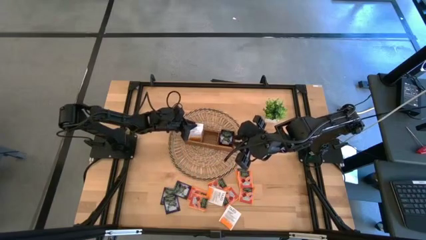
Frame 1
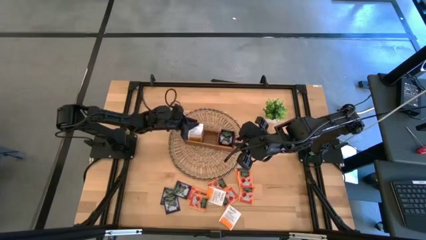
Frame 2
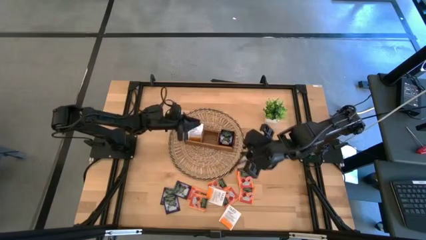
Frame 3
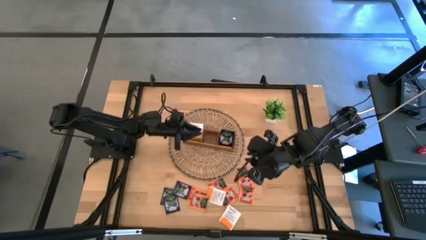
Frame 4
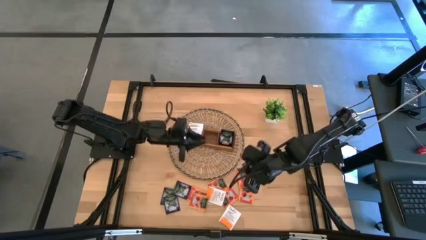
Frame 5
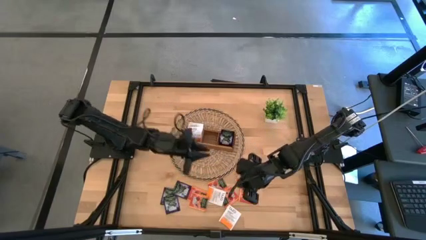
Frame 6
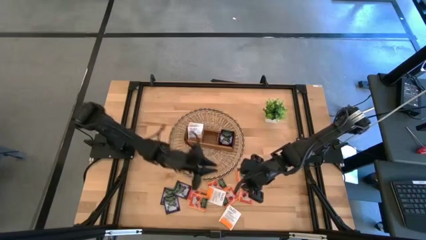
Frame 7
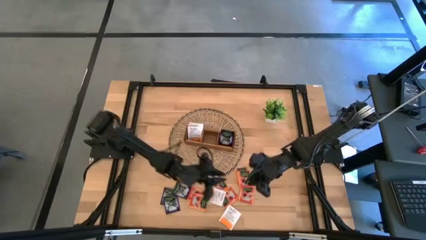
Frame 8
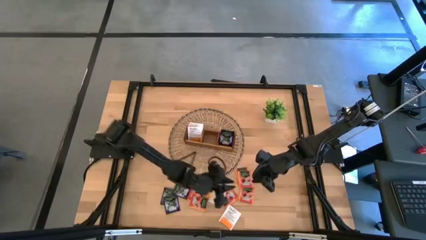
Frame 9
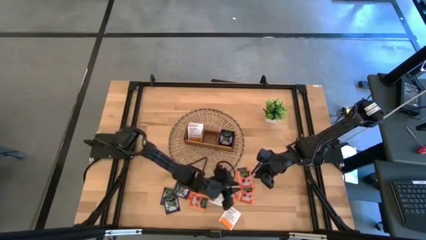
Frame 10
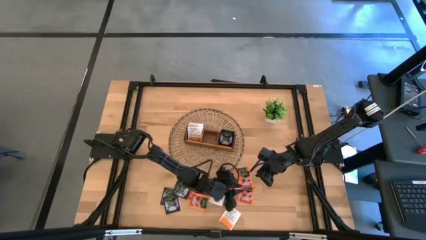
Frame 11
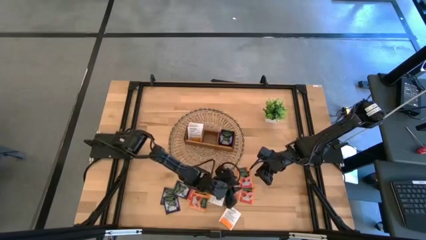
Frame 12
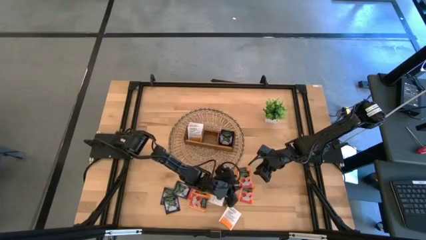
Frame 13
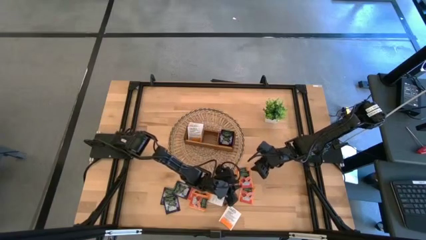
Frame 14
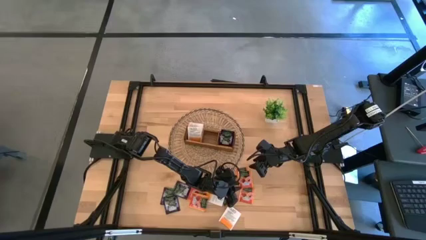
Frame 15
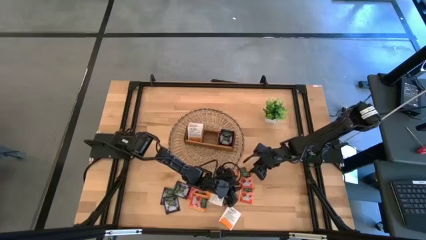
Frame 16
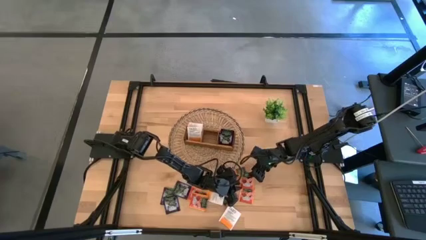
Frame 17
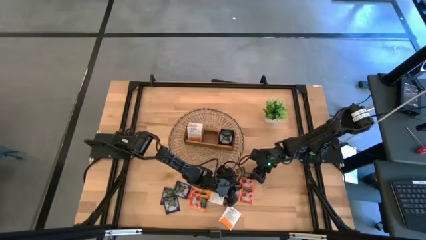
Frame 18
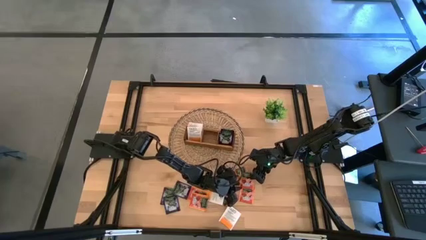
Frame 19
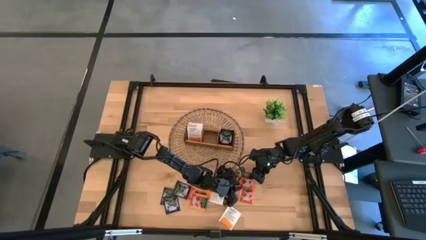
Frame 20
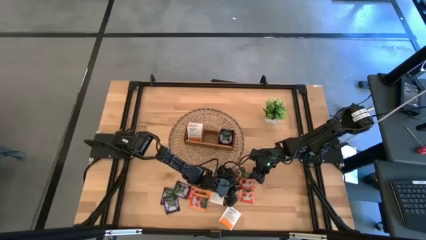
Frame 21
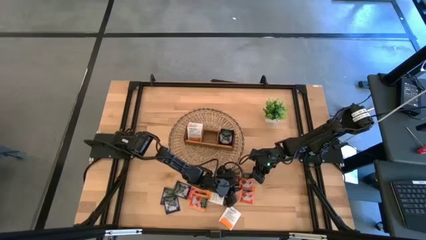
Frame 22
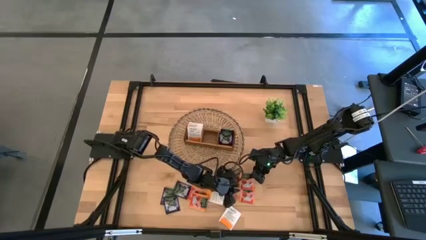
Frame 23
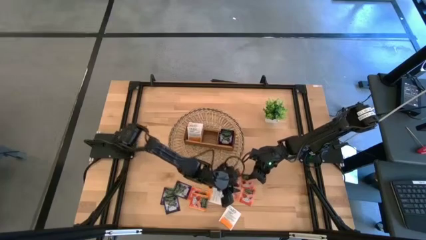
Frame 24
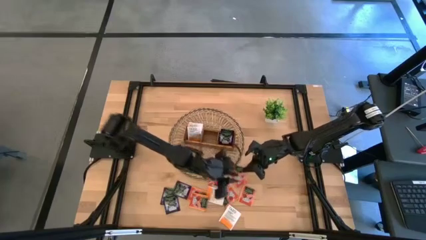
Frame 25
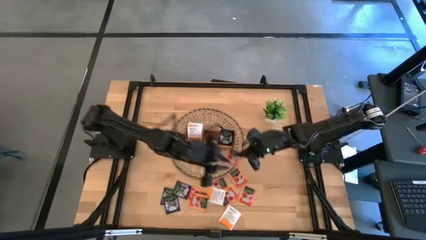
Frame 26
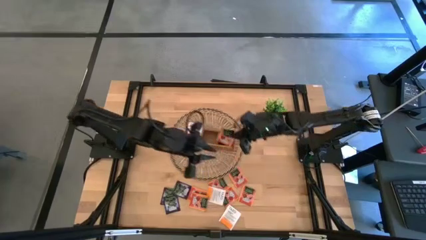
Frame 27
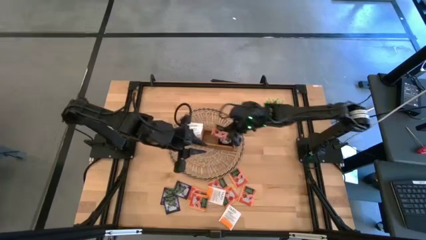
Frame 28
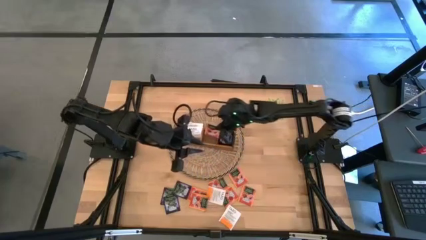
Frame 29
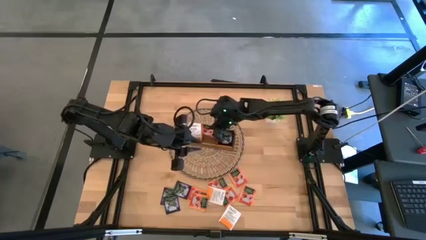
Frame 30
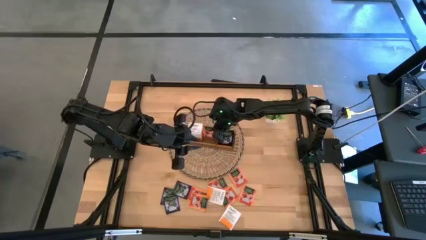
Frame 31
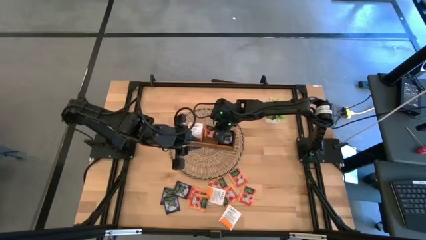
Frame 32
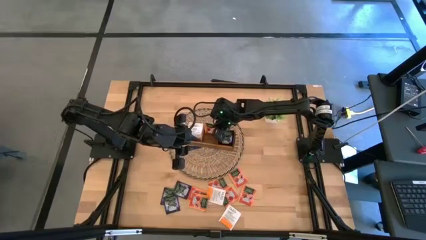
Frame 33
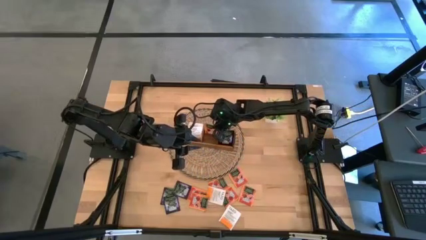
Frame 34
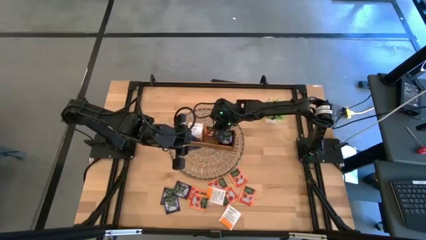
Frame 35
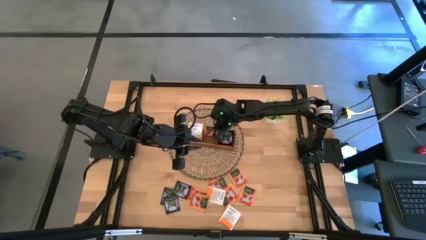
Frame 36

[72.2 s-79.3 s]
Task: Pick & Place Tea
Put the orange tea bag into the middle section of the wooden organizer

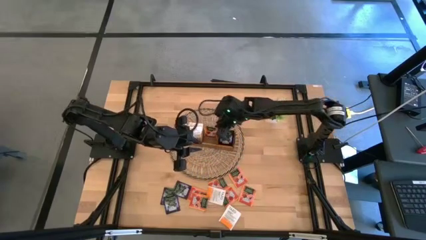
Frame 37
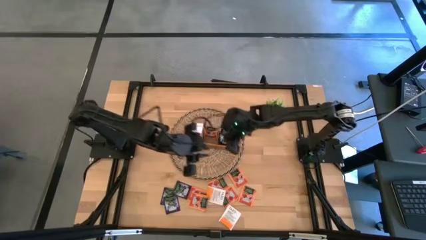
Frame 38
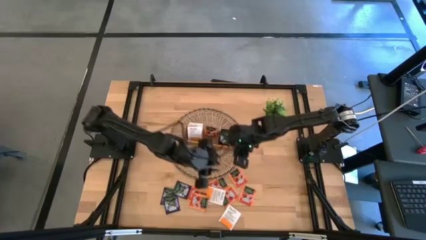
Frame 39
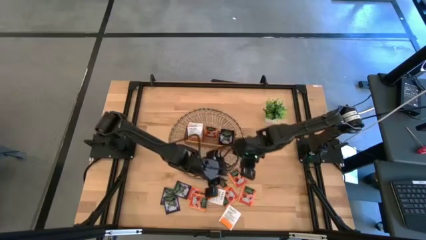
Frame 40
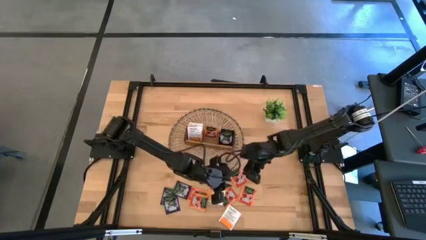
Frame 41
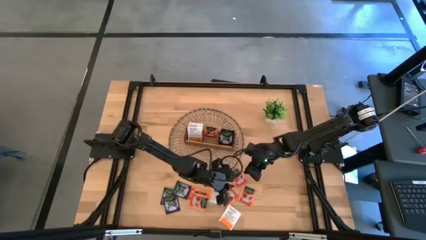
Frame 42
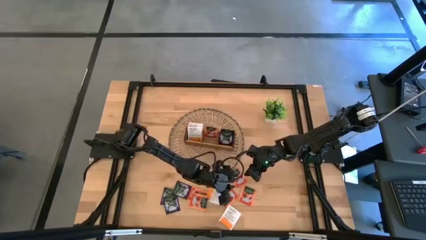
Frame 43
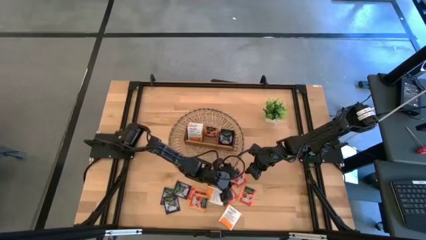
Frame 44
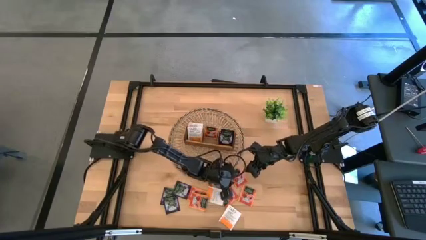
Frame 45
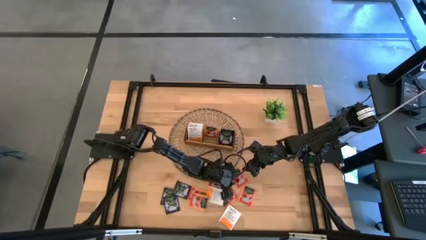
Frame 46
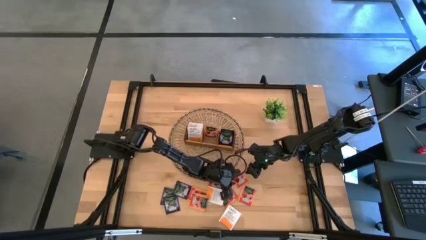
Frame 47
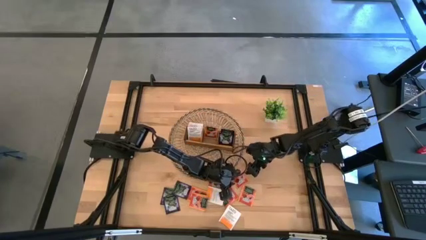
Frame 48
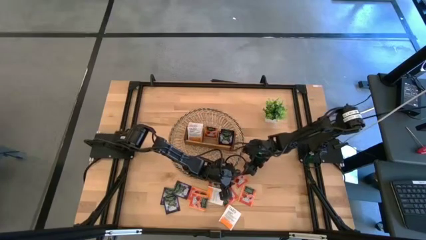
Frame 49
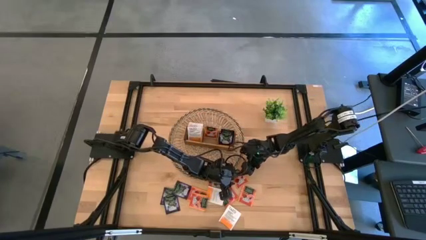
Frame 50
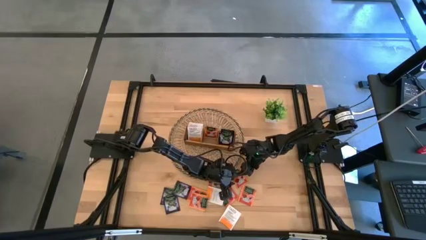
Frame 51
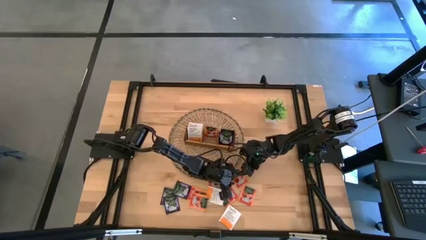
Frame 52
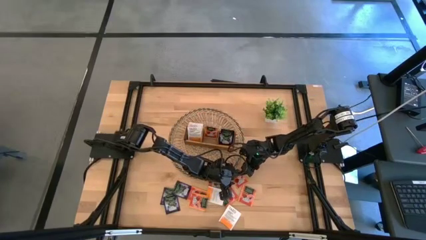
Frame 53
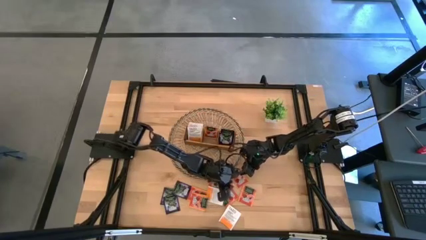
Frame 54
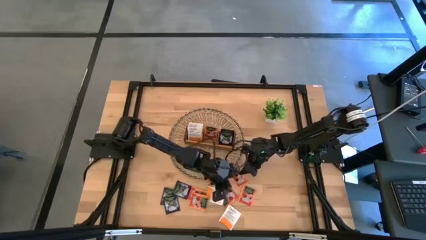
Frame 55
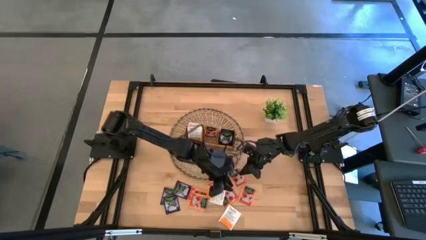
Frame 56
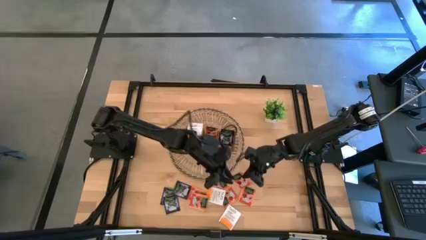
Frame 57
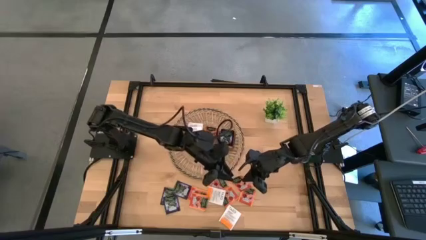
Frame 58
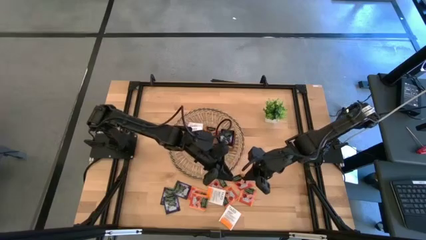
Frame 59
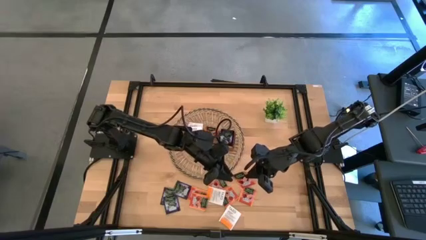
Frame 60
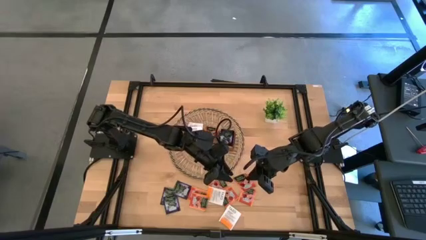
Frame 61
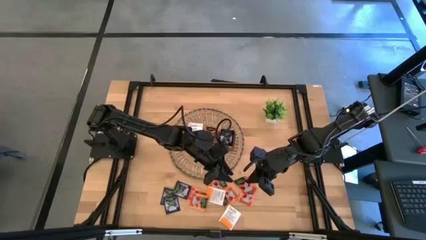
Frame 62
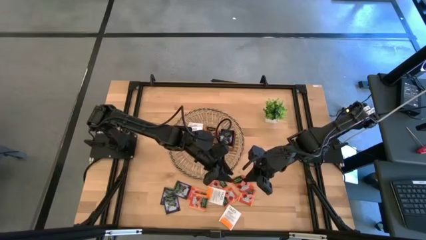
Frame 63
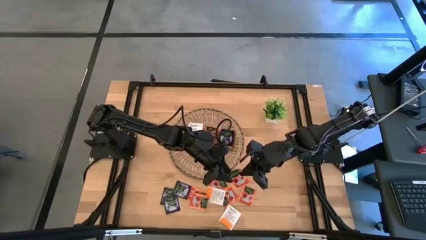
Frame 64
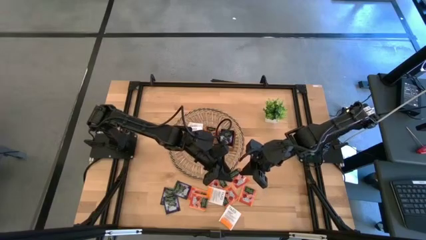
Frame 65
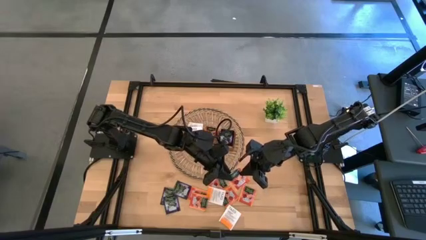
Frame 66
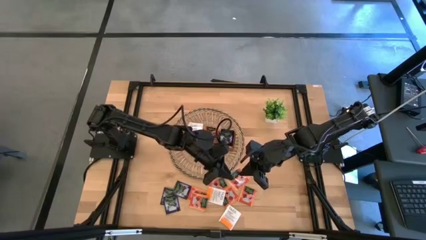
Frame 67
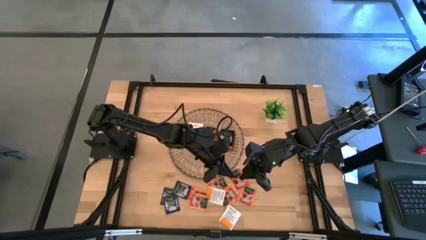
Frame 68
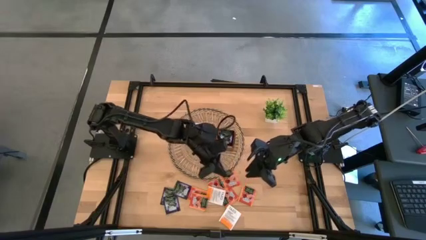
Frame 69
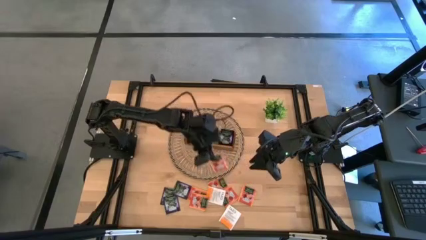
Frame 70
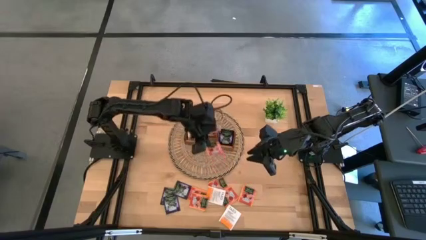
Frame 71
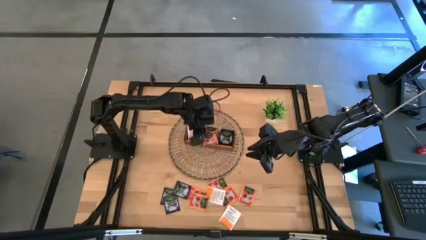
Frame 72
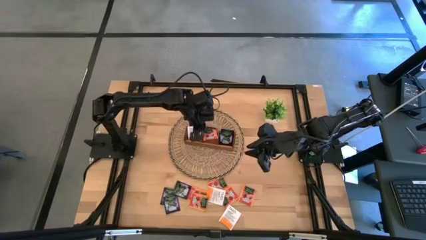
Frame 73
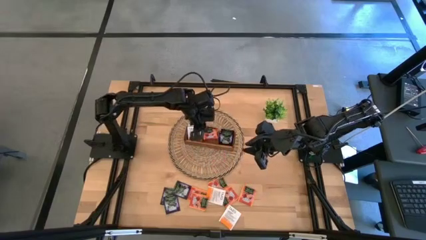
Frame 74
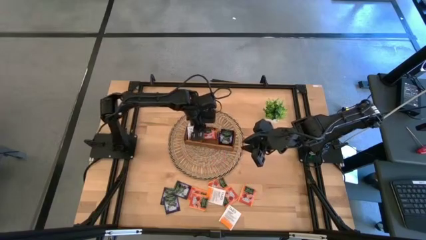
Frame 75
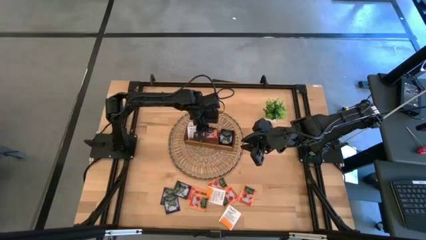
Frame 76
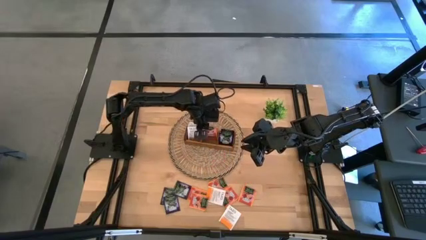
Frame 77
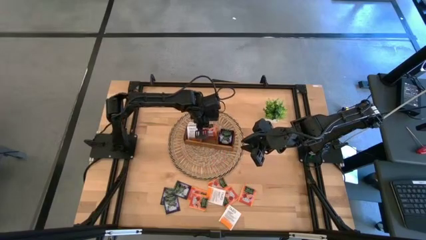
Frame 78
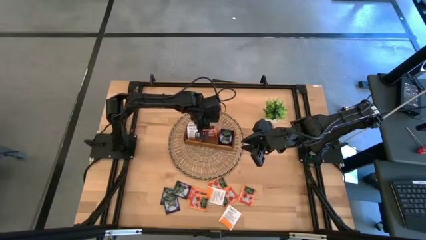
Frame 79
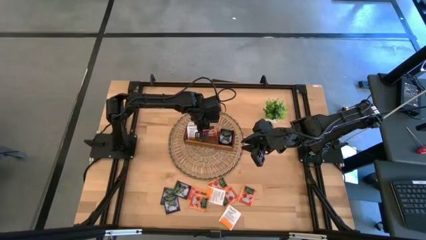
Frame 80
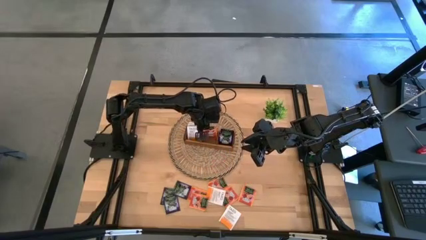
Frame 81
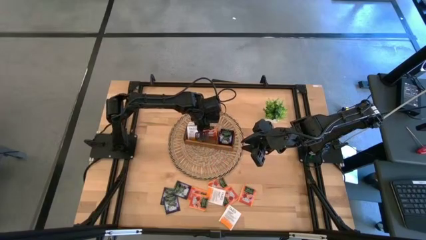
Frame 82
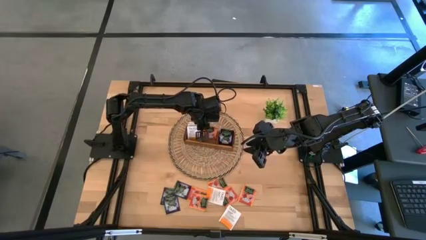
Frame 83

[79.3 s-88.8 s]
Put the orange tea bag into the middle section of the wooden organizer
